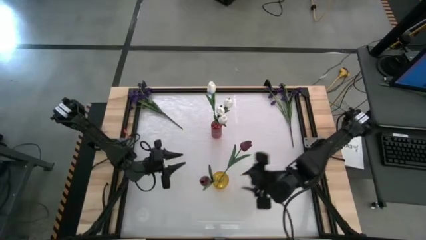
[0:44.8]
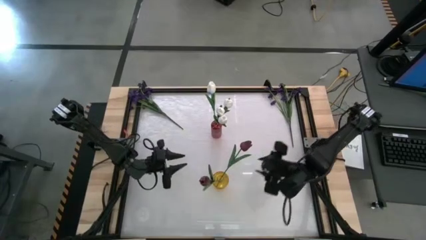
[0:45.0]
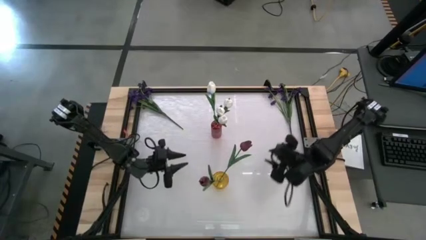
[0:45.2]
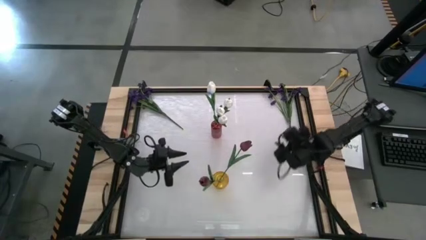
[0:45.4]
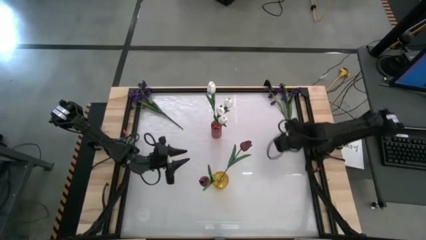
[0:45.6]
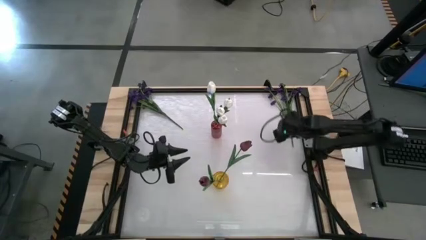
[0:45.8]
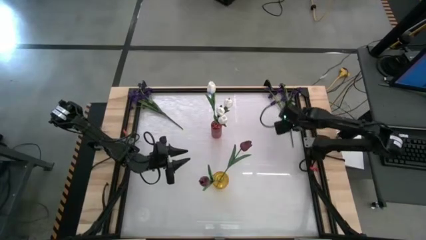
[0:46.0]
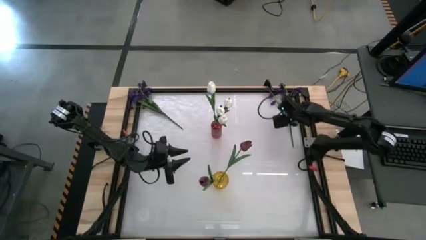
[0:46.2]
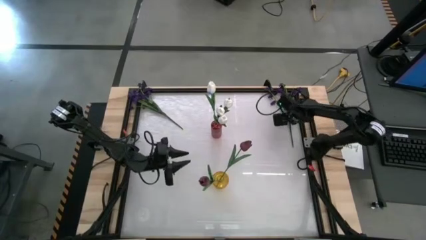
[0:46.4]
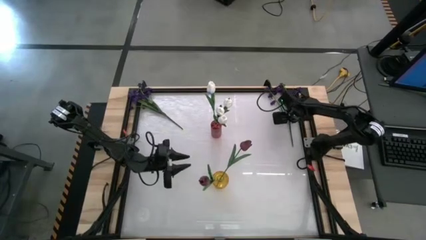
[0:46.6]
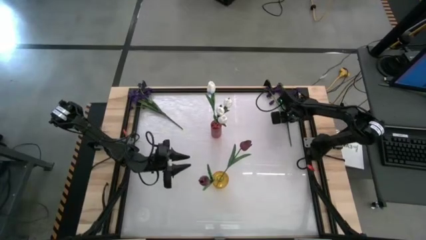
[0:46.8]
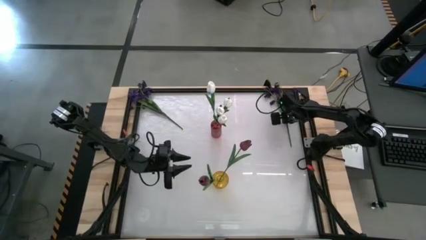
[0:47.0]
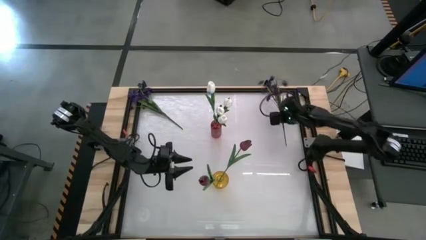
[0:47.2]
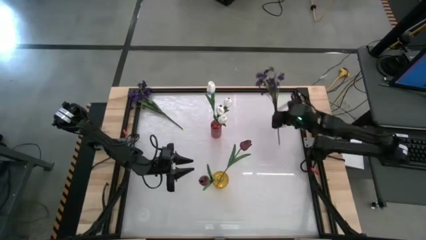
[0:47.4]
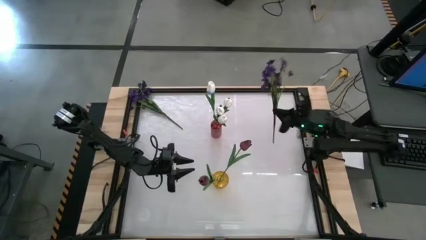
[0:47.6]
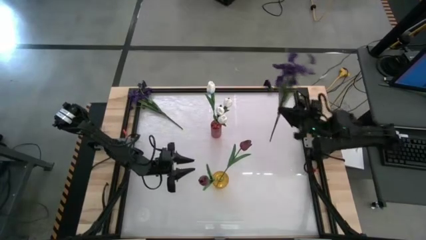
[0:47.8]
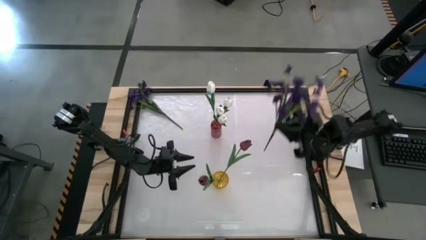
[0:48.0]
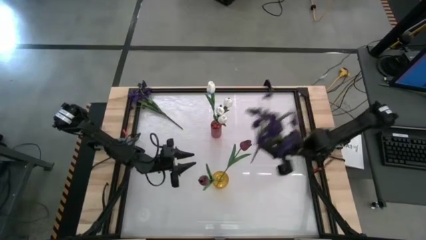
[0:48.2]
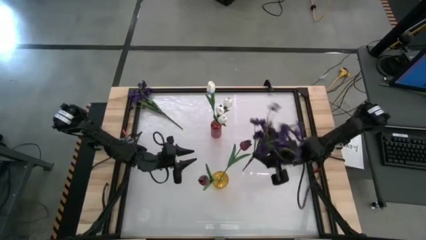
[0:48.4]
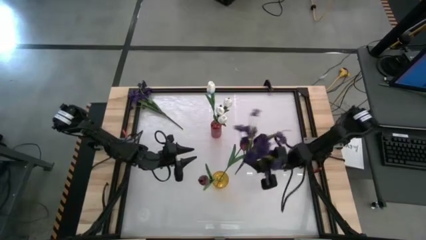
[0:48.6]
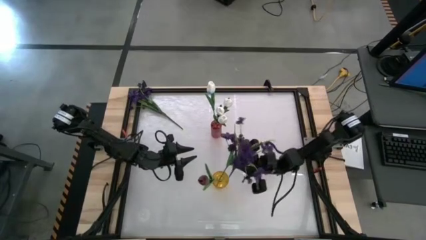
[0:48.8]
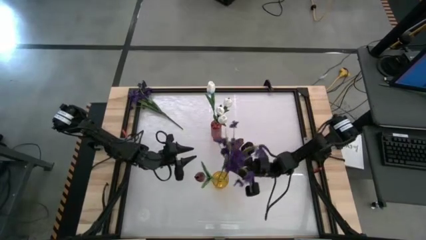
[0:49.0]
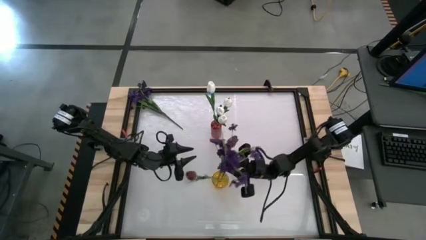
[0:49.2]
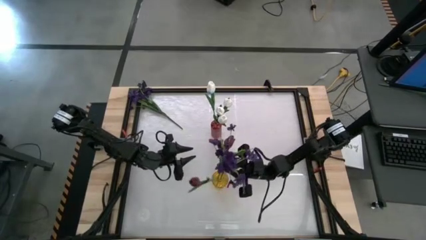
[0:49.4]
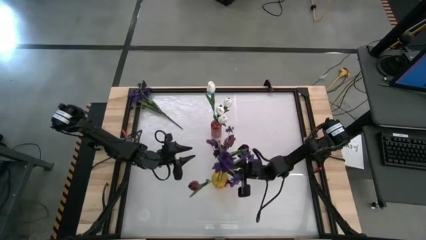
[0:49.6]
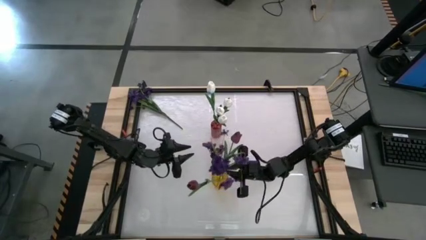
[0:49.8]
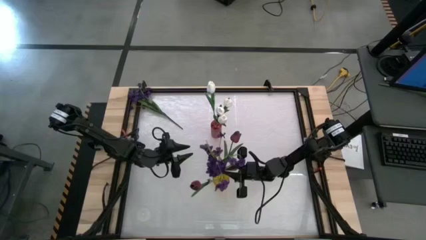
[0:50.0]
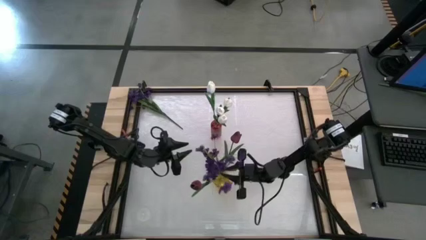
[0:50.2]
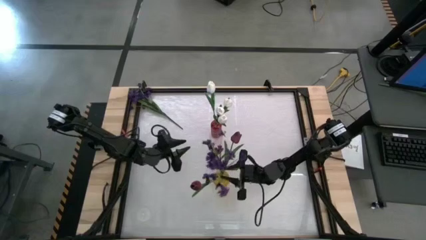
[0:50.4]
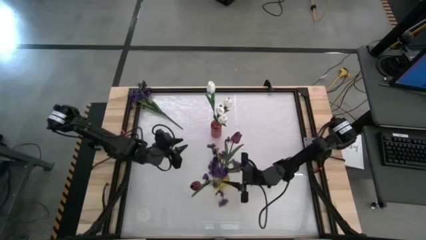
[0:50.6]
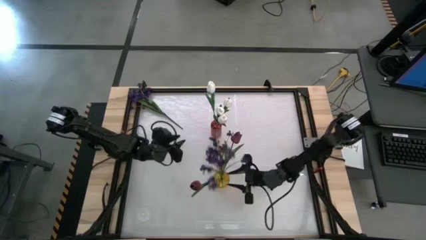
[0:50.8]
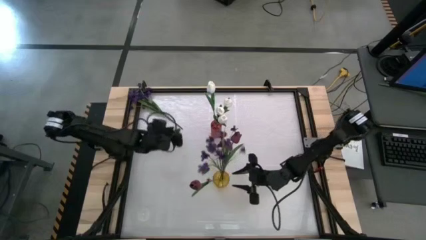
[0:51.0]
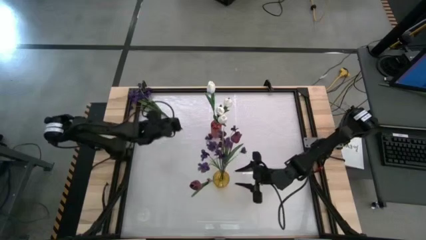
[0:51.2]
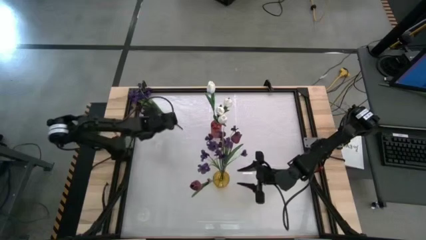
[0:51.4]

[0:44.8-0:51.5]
Task: Sort flowers into vase by color
Put the right purple flowers into the yellow vase

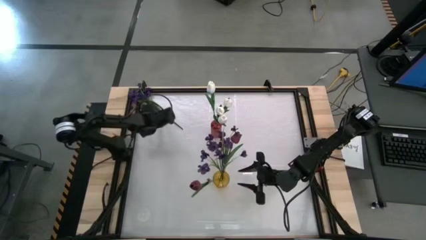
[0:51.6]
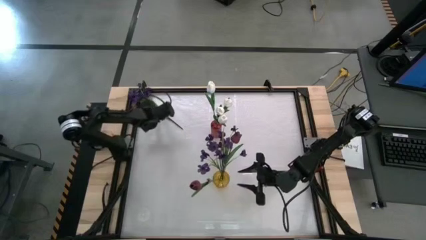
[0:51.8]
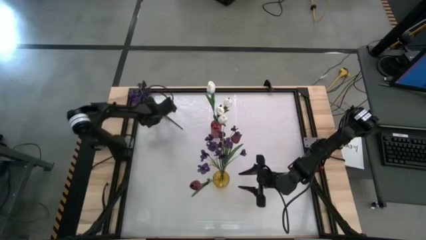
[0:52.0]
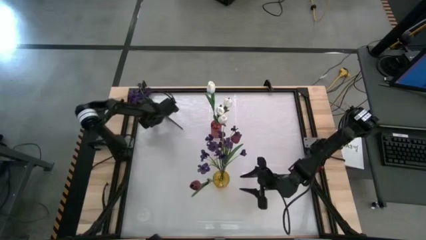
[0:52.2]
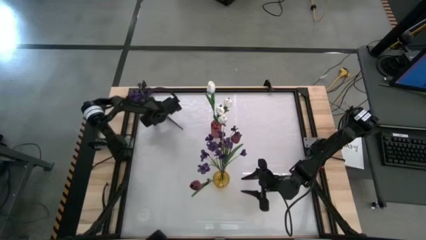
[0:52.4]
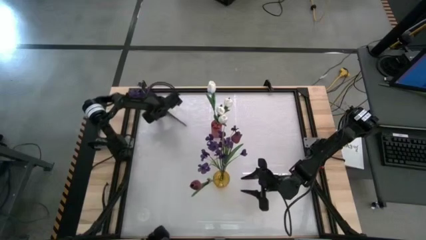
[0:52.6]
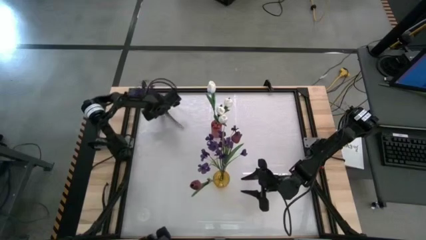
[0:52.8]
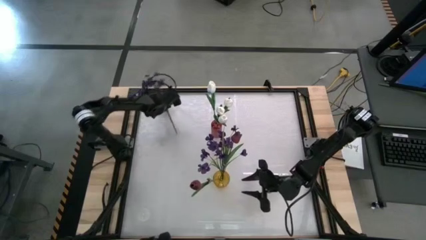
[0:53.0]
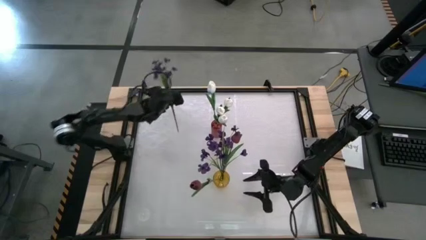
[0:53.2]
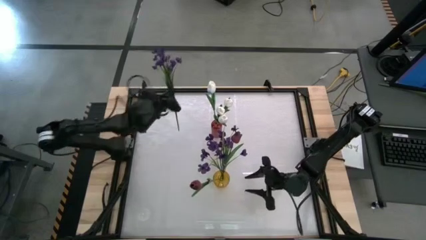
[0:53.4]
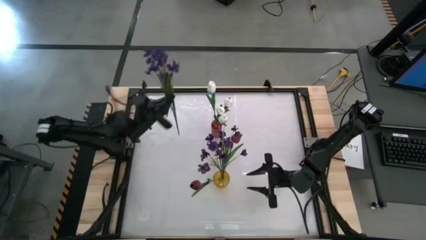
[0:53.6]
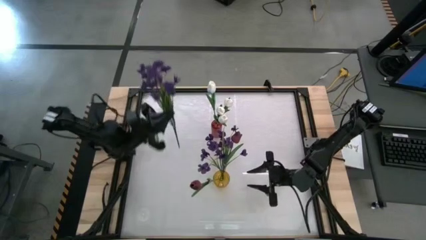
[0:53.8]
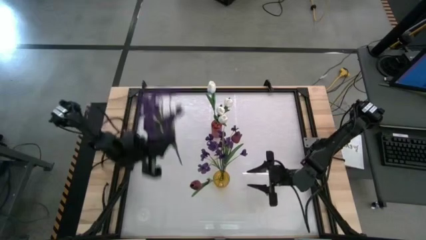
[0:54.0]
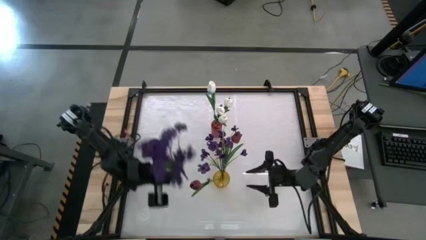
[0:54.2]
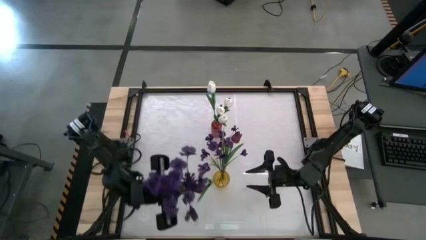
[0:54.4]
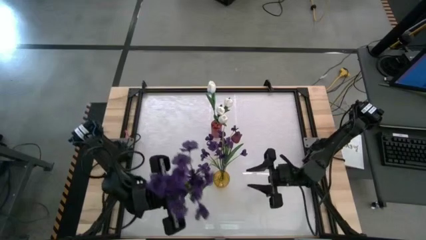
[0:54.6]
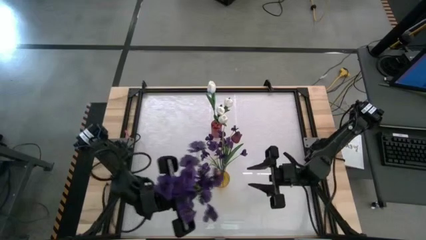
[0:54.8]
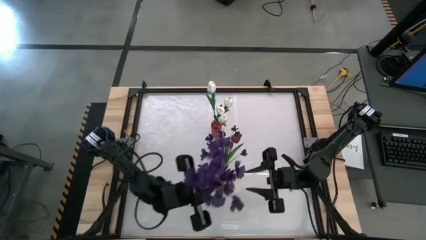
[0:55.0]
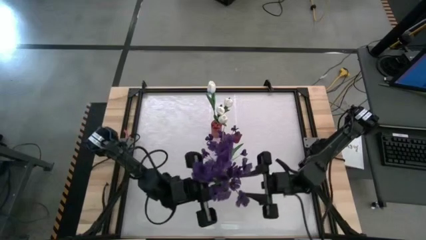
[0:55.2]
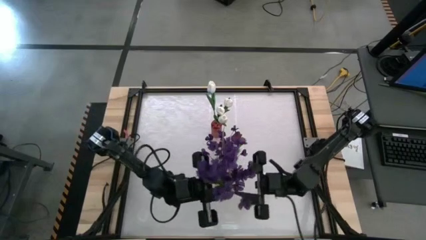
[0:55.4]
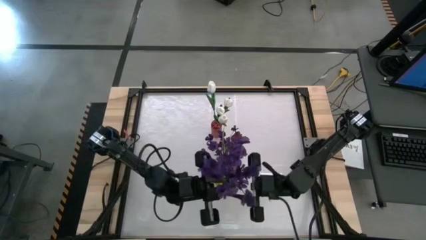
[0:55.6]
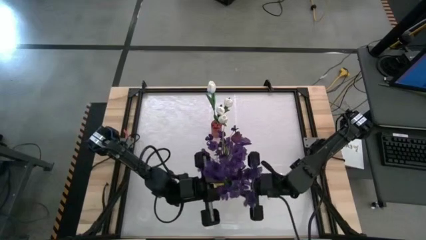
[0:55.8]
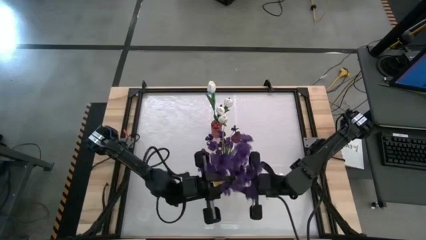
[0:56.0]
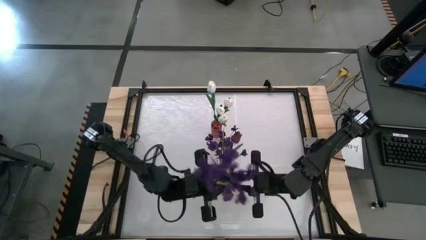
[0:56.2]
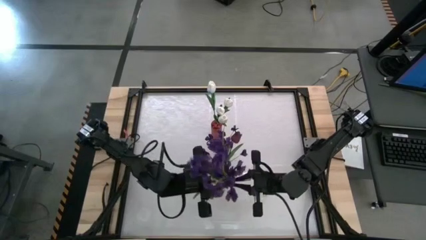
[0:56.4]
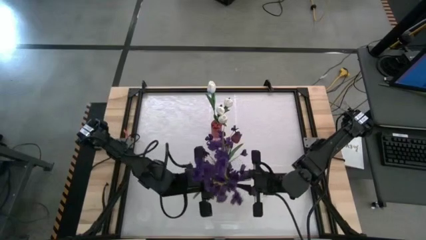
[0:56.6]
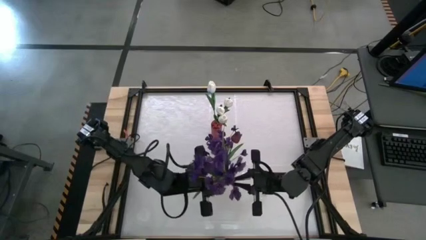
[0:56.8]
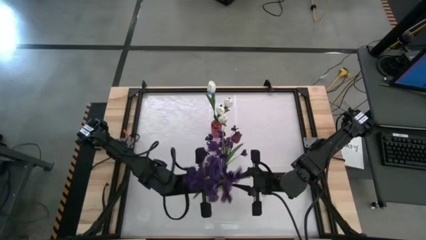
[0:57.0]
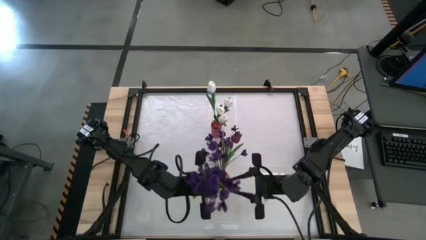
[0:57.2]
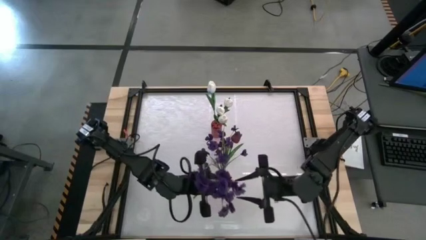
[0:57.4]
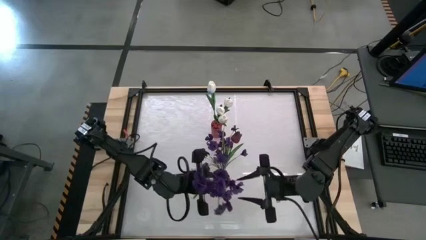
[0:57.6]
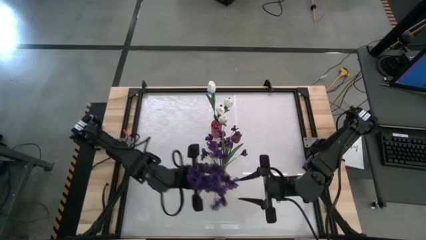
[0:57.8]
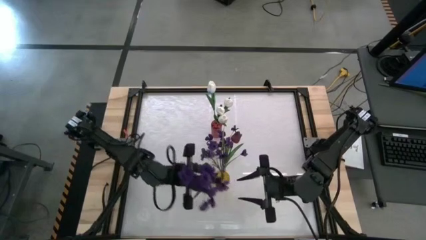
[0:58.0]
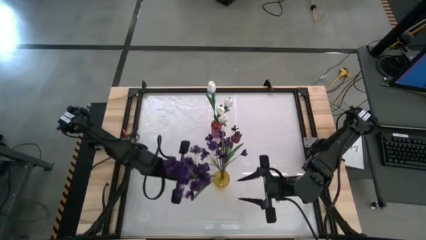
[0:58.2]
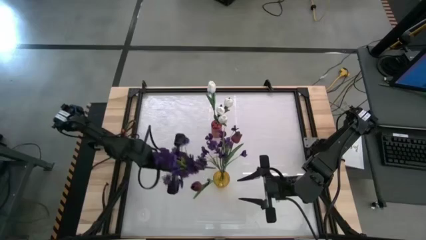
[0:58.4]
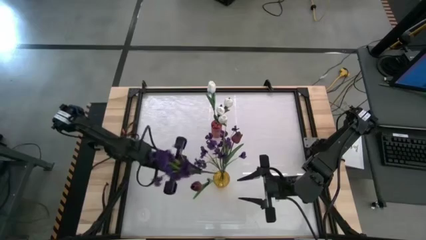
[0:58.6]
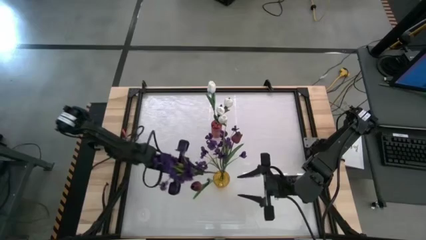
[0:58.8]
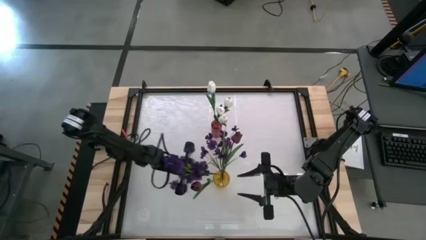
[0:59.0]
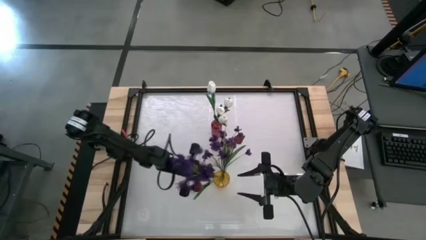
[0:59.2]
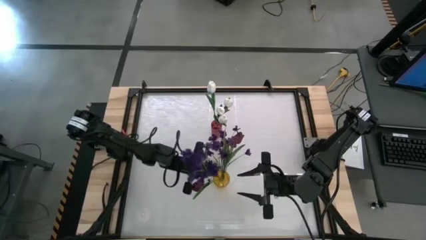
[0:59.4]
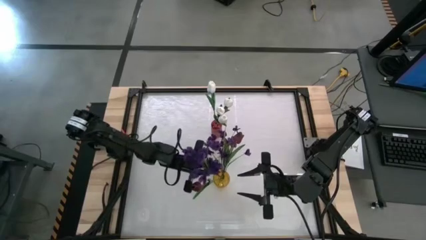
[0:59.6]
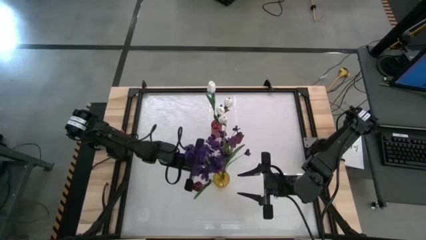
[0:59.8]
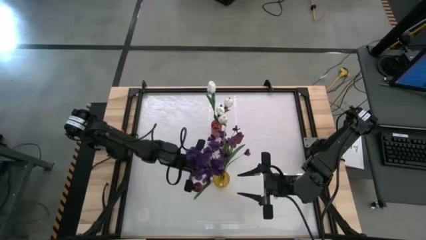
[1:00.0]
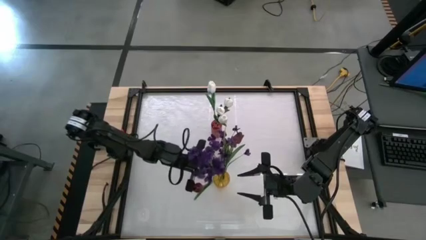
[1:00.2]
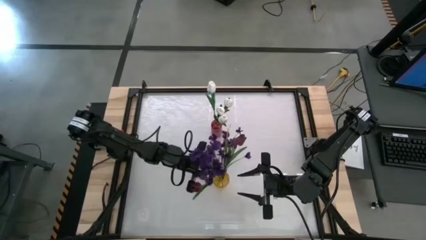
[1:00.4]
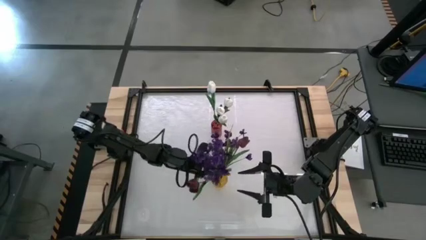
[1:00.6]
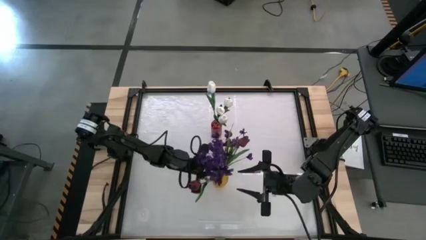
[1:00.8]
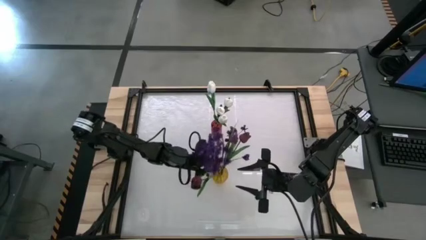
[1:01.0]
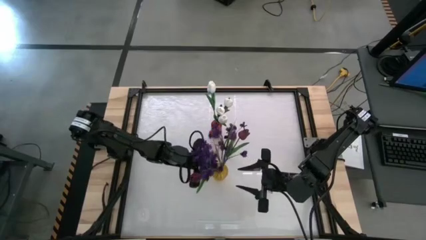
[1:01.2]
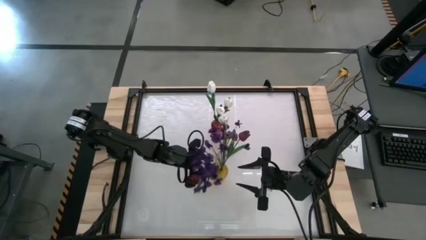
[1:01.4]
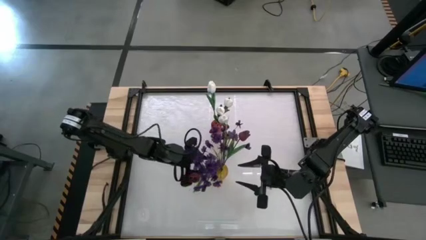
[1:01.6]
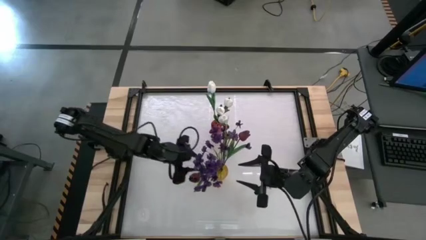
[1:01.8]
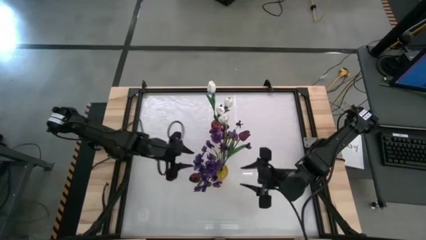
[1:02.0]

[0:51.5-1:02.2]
Put the purple flowers into the yellow vase
